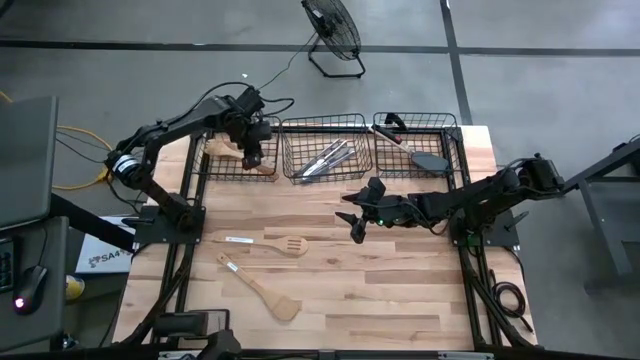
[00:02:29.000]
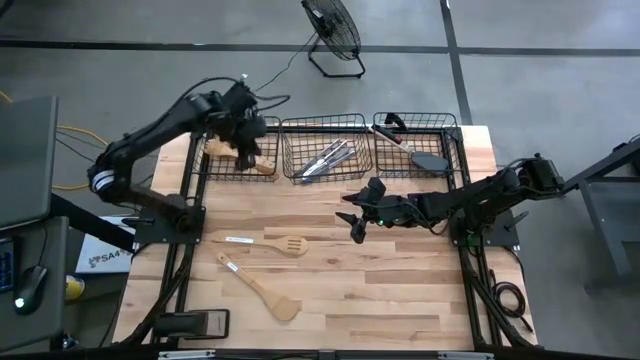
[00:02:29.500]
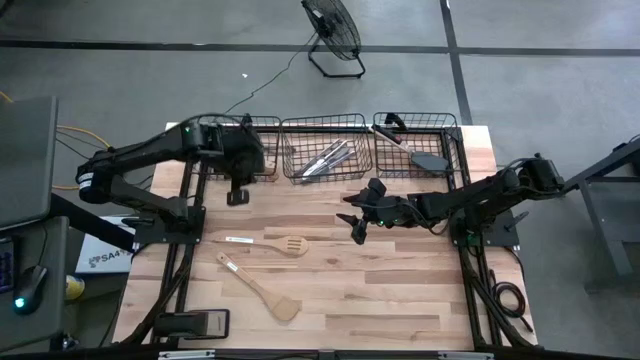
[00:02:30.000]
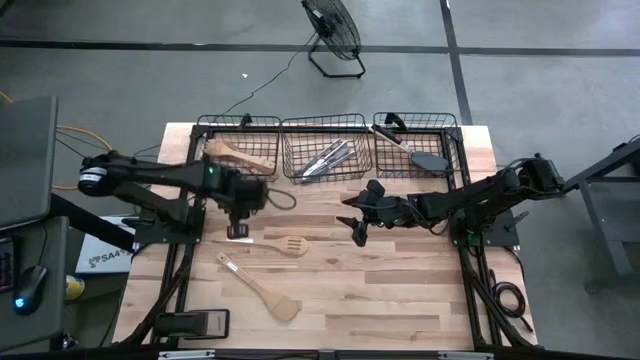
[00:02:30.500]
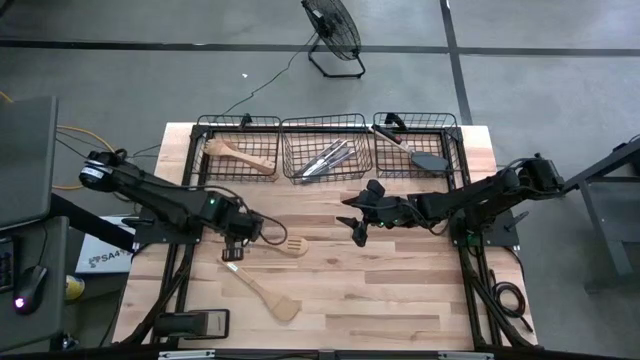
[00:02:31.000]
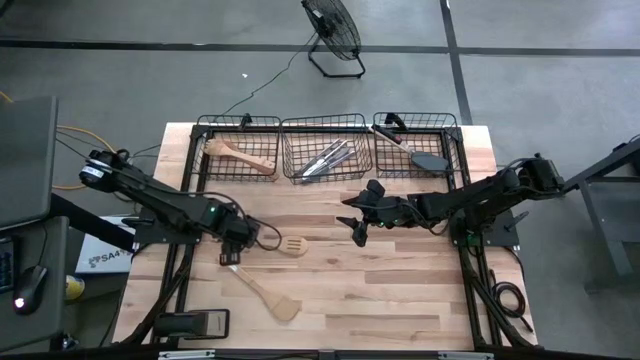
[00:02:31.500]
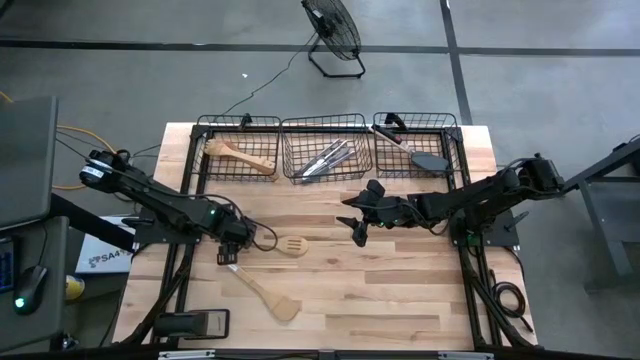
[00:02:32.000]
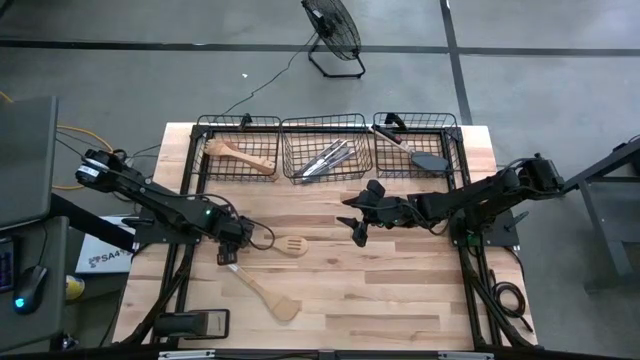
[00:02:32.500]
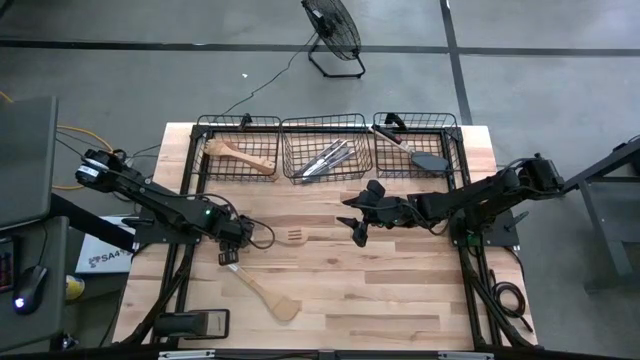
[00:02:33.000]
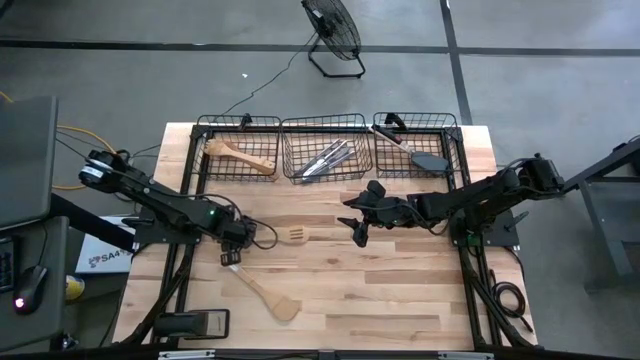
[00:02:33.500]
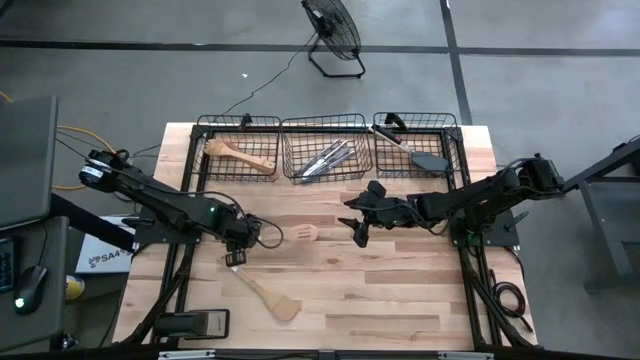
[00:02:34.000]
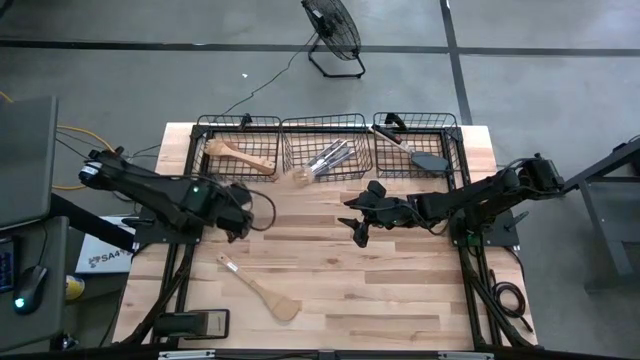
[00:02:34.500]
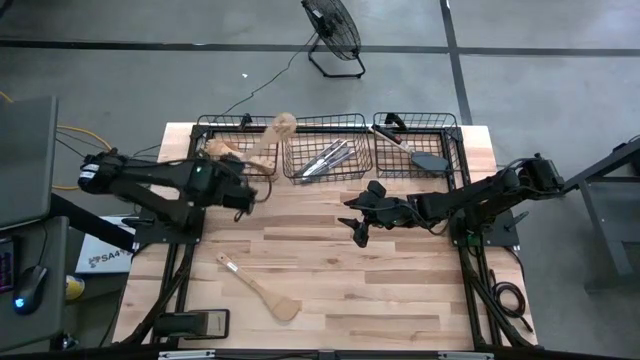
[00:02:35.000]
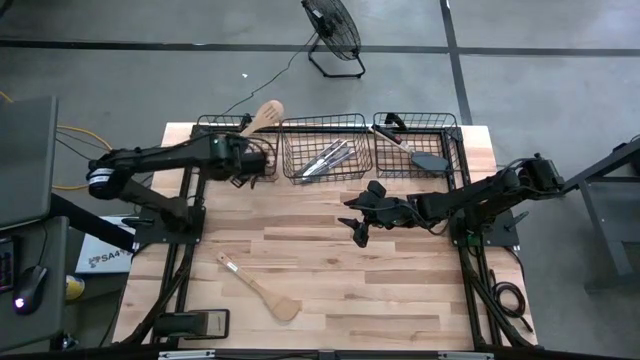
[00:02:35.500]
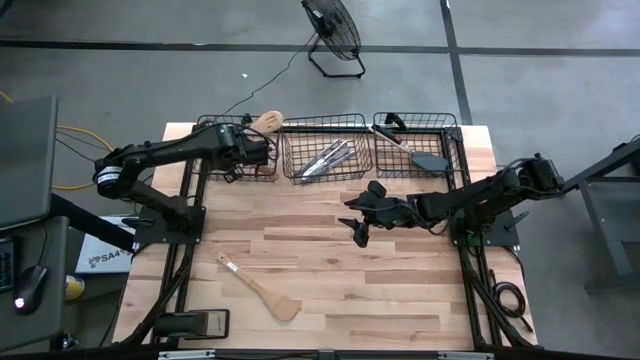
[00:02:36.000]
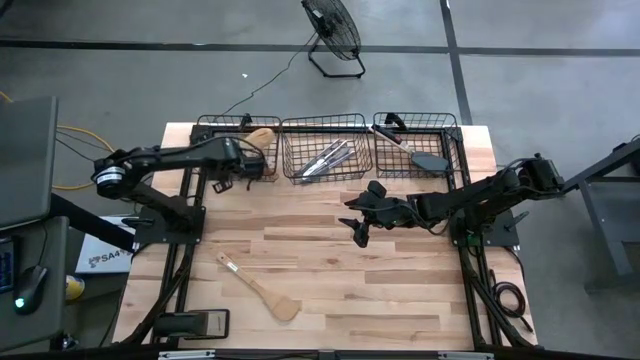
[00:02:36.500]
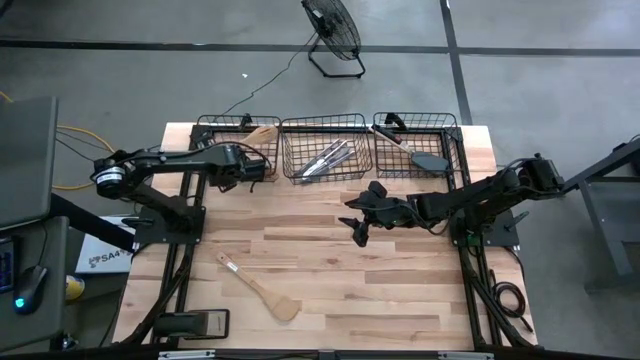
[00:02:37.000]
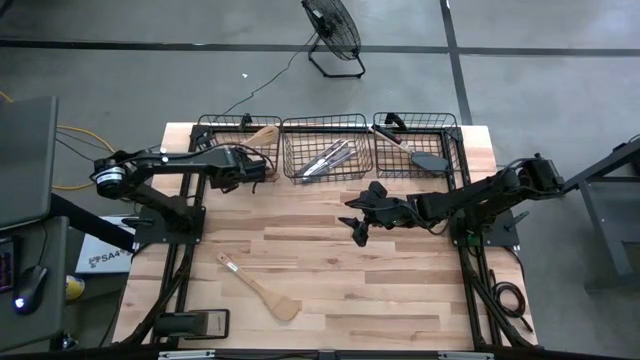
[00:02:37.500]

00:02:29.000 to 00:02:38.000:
Task: Pick & Place Kitchen Items
Put the brown serving spoon into the left mesh basket

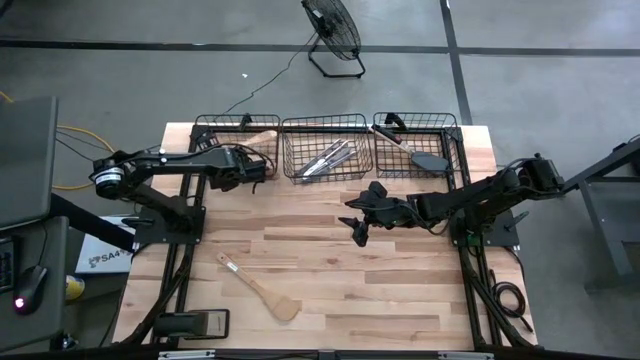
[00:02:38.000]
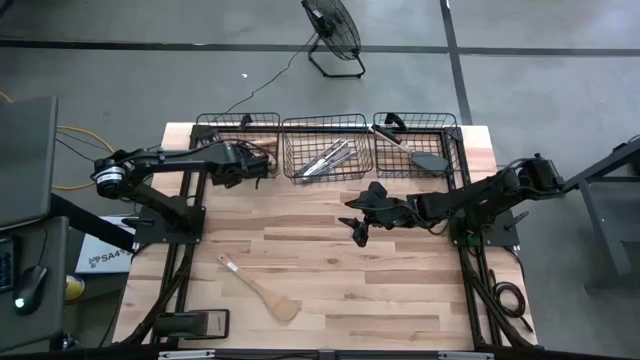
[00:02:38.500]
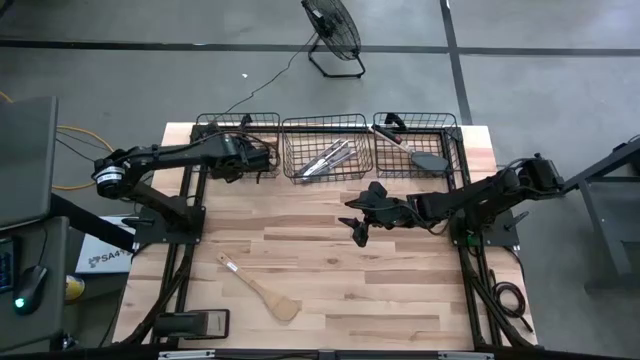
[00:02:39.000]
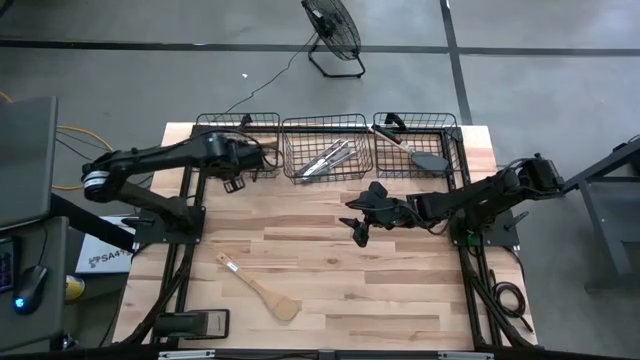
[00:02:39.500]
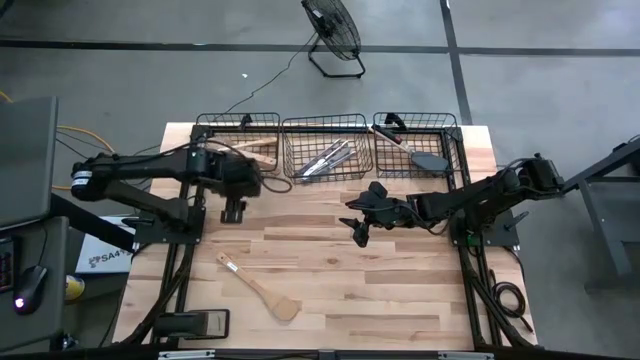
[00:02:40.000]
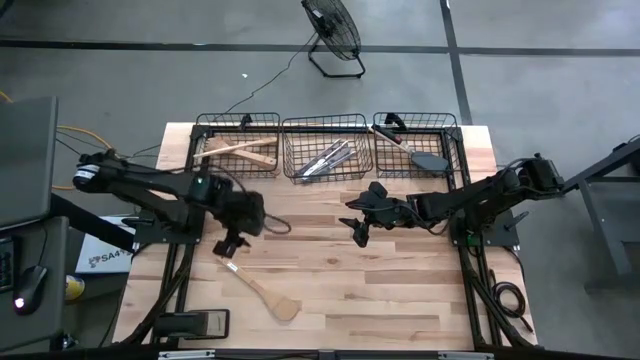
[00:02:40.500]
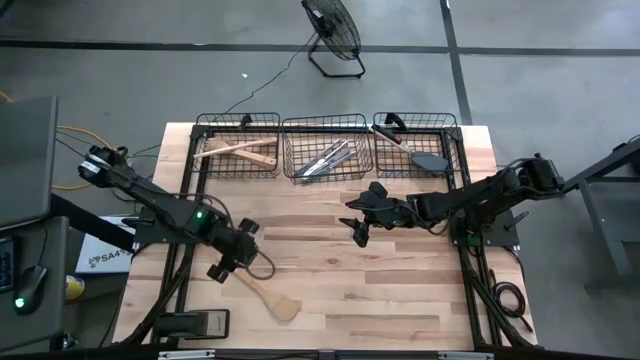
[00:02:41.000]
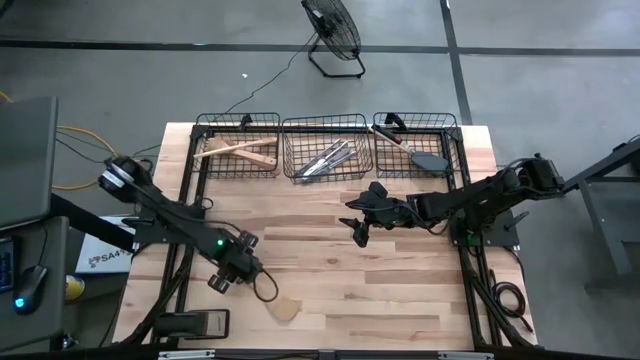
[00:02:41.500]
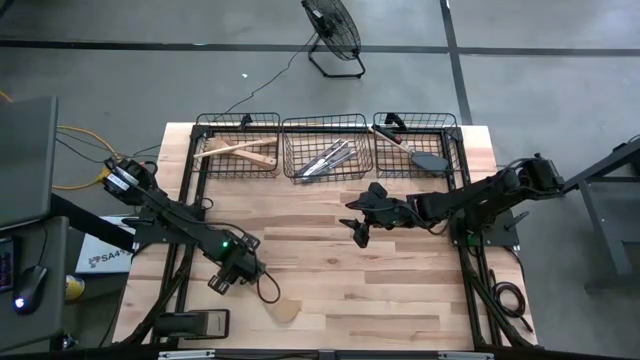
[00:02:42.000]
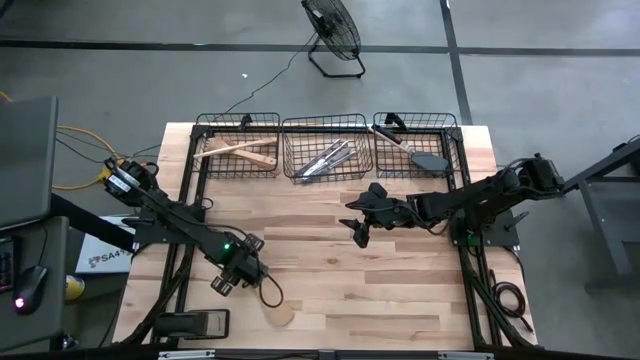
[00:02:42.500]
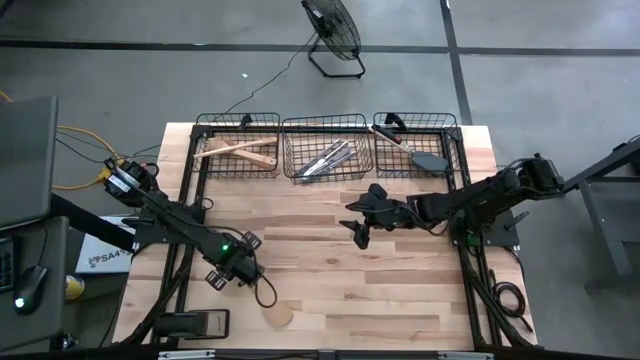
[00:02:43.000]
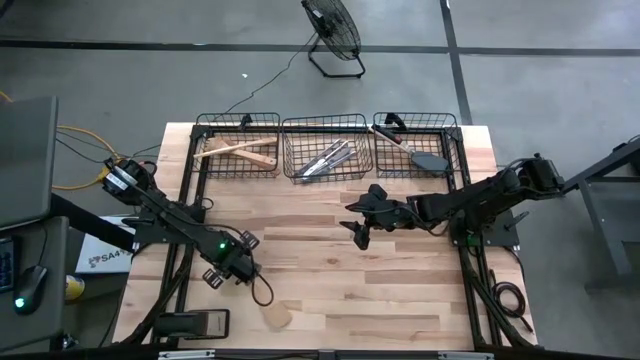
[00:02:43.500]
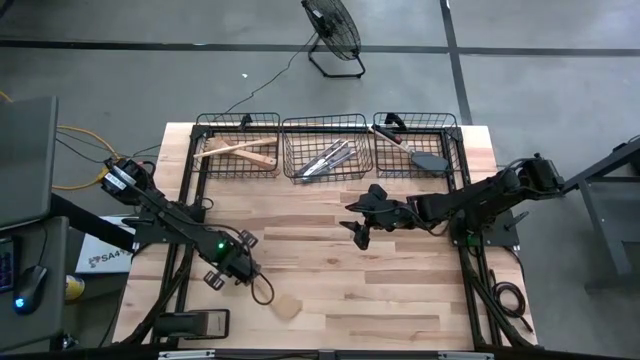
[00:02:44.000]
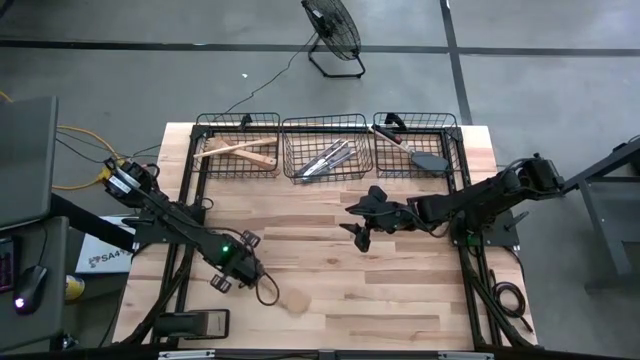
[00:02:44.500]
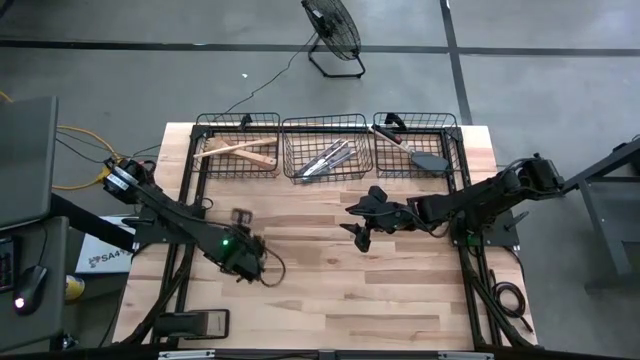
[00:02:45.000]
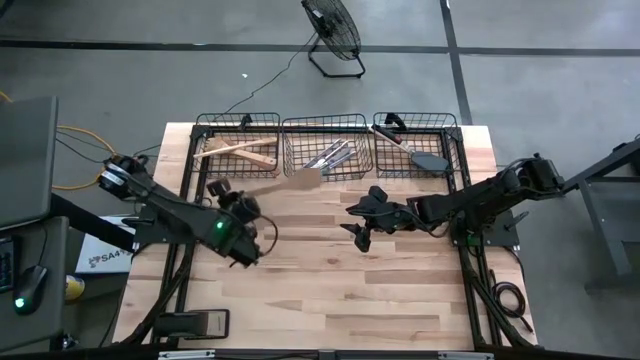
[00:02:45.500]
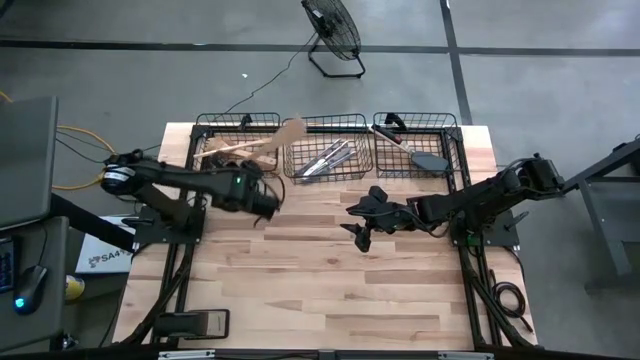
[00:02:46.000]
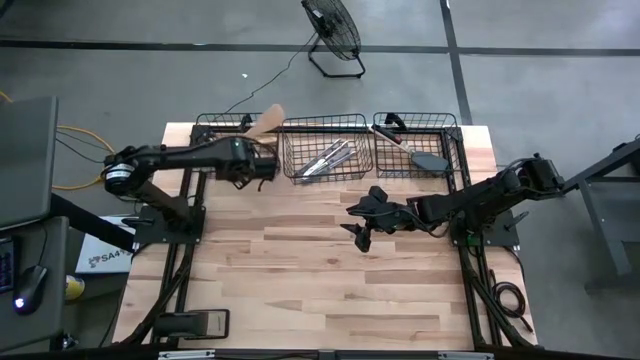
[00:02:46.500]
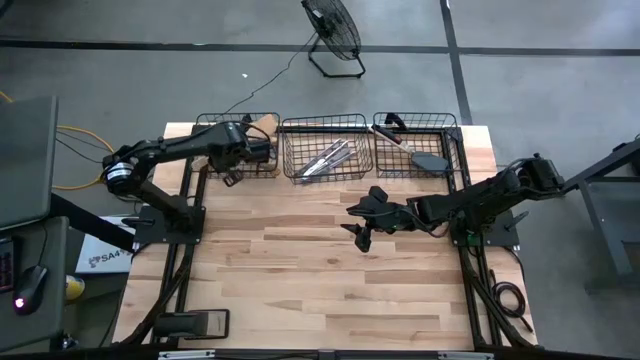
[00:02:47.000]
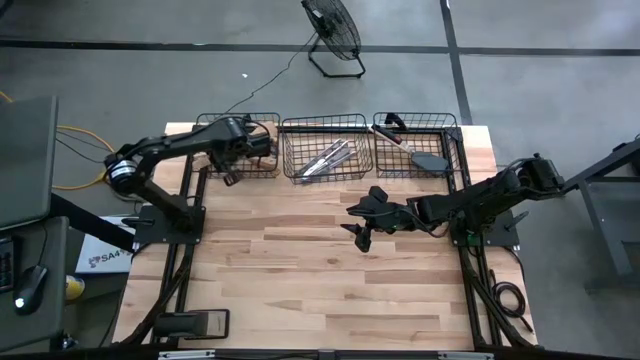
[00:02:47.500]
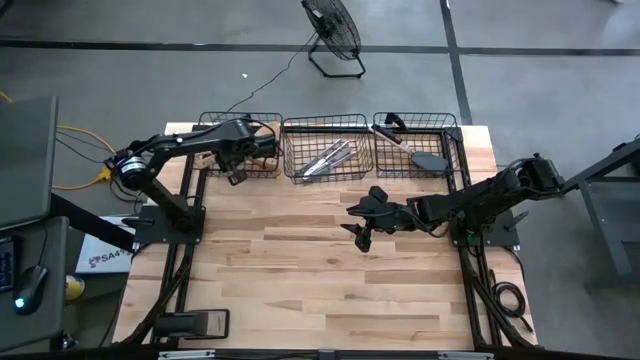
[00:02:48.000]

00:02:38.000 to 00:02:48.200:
Put the brown serving spoon into the left mesh basket

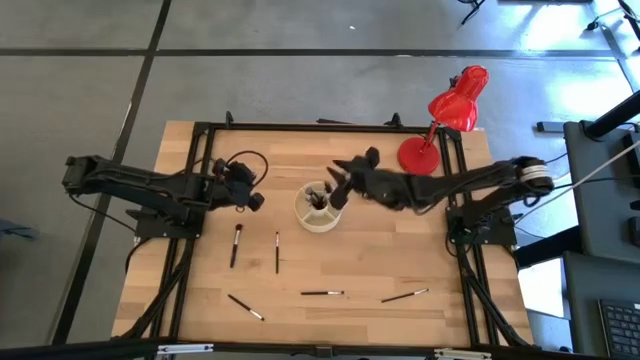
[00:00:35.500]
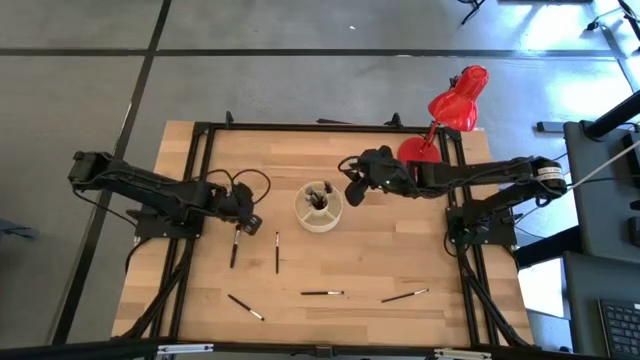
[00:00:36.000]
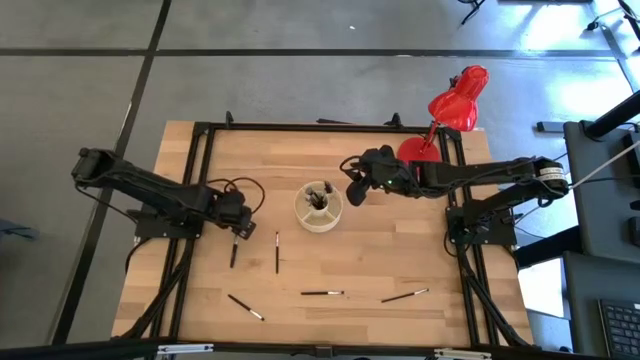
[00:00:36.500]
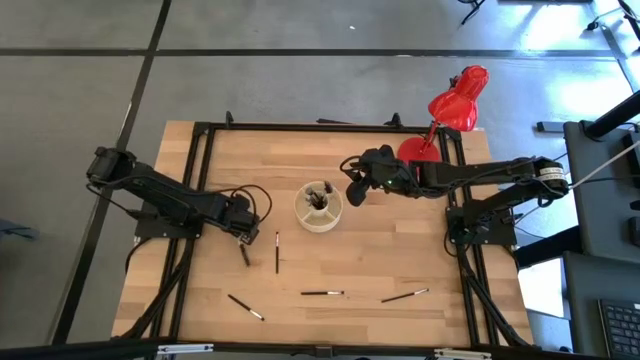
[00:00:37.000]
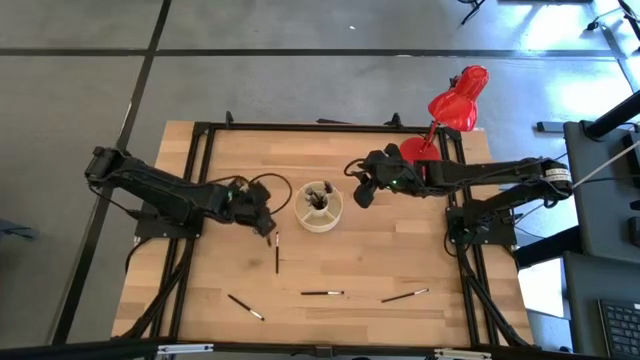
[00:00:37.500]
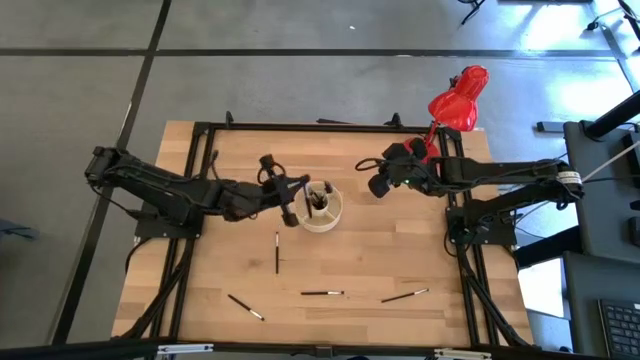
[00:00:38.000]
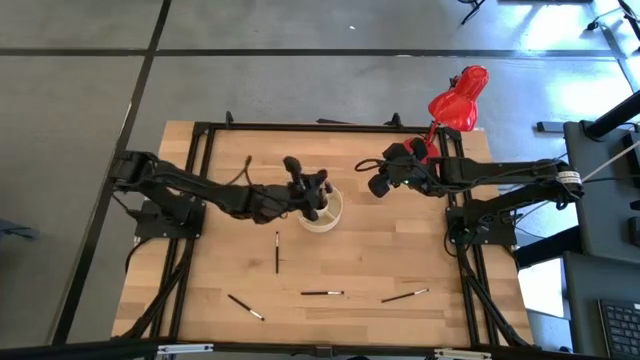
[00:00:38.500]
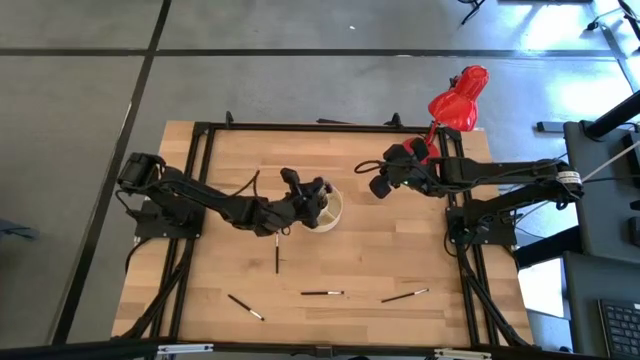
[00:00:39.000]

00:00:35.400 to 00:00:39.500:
Task: Put items in baskets/containers
Put the powder brush into the white organizer
